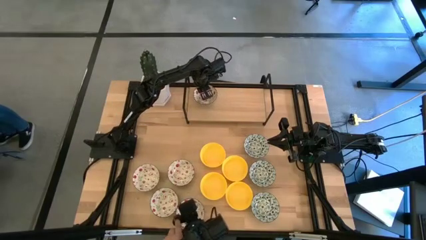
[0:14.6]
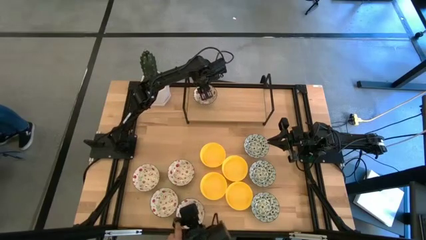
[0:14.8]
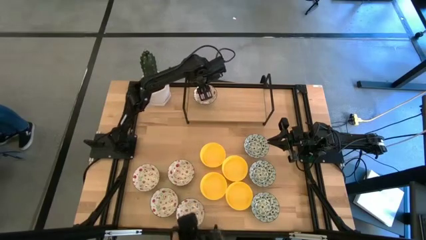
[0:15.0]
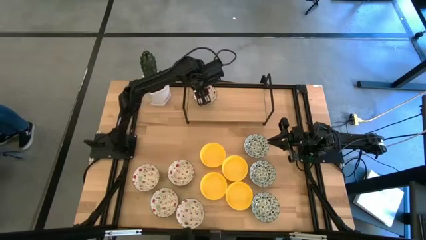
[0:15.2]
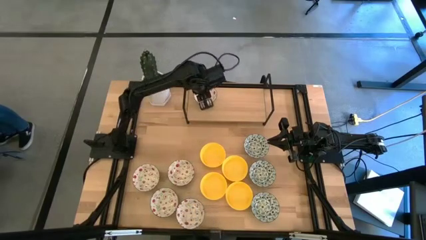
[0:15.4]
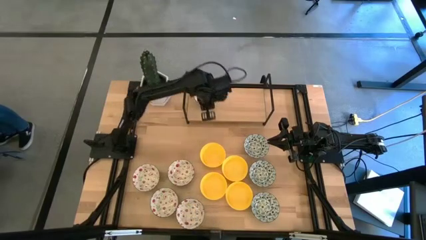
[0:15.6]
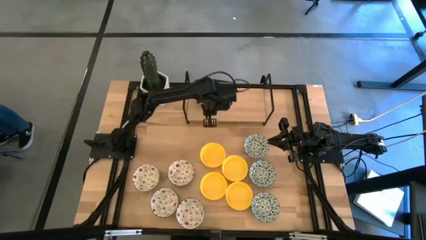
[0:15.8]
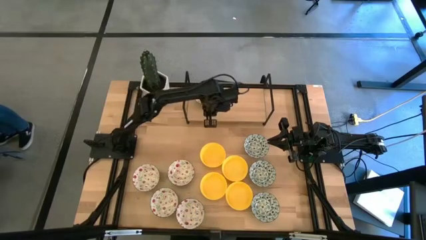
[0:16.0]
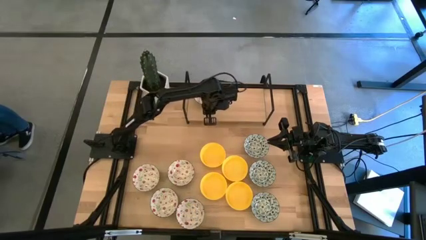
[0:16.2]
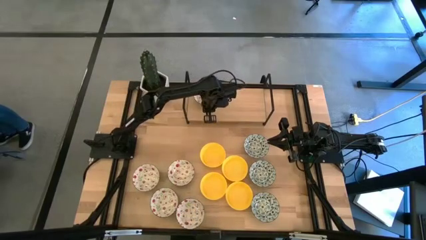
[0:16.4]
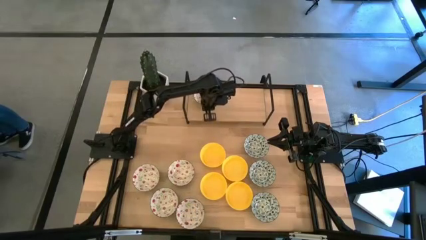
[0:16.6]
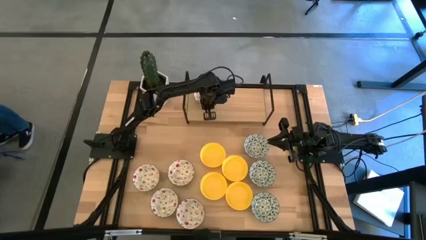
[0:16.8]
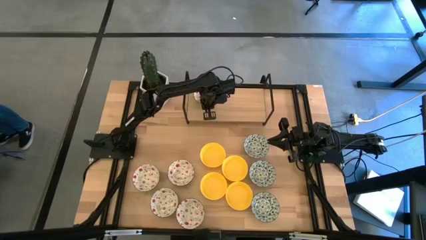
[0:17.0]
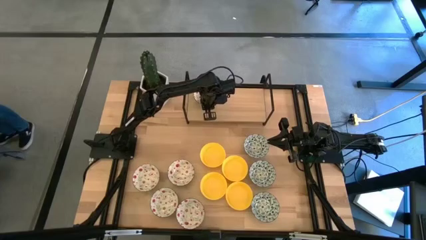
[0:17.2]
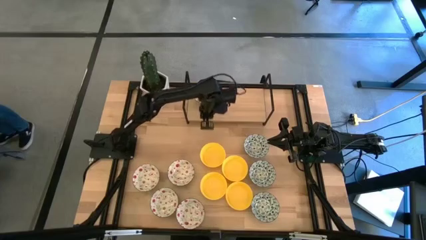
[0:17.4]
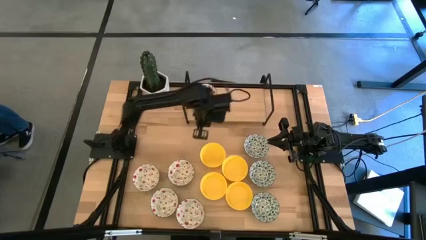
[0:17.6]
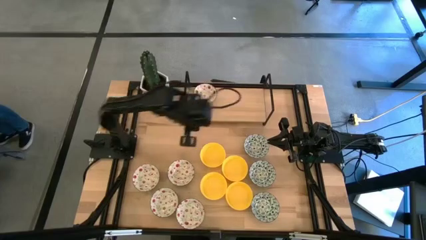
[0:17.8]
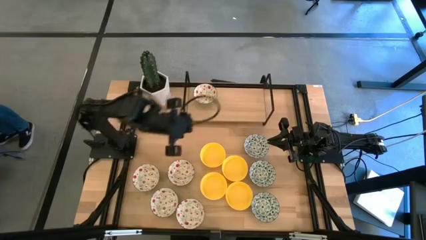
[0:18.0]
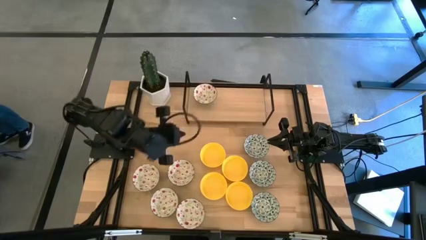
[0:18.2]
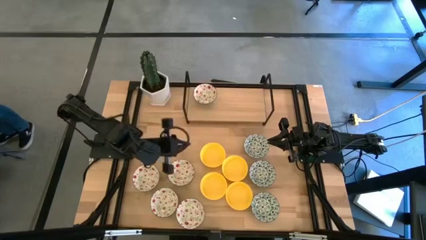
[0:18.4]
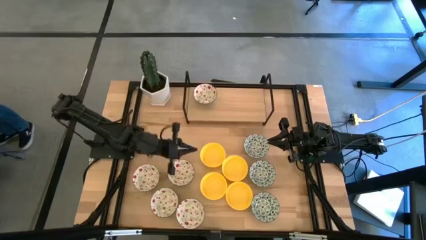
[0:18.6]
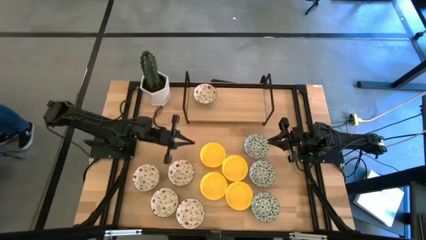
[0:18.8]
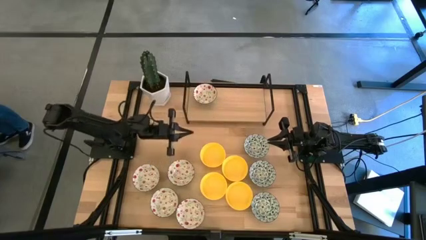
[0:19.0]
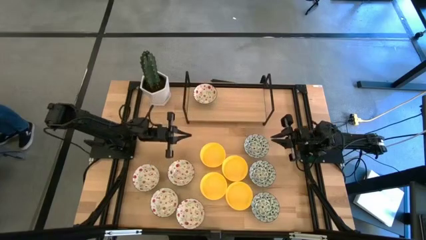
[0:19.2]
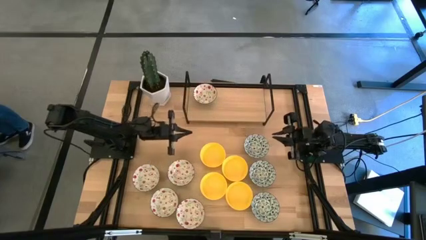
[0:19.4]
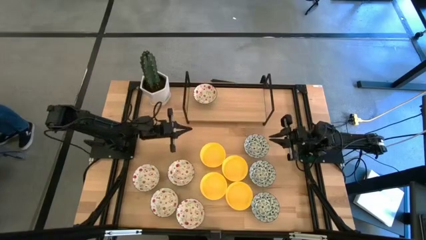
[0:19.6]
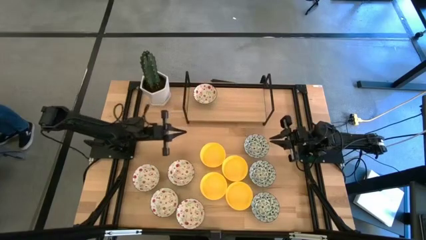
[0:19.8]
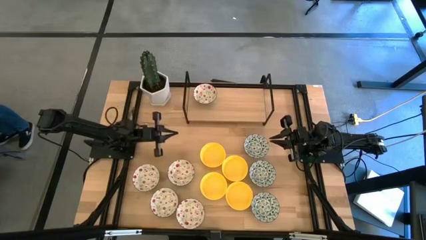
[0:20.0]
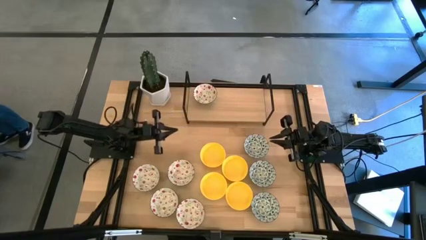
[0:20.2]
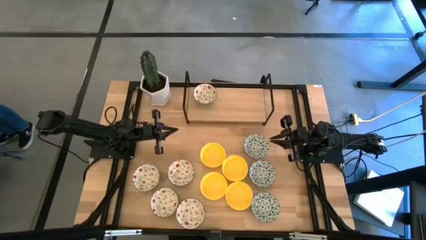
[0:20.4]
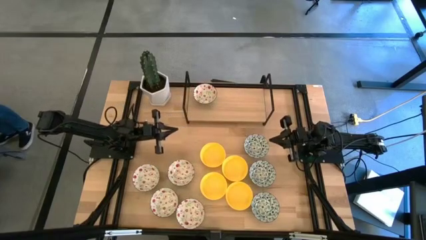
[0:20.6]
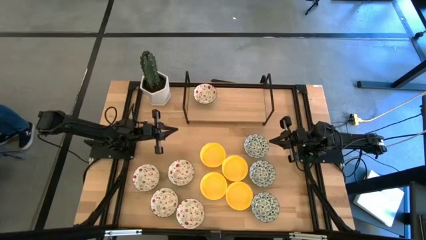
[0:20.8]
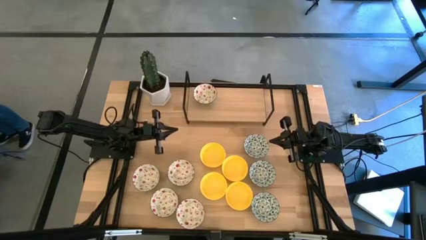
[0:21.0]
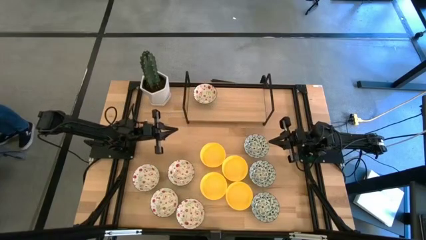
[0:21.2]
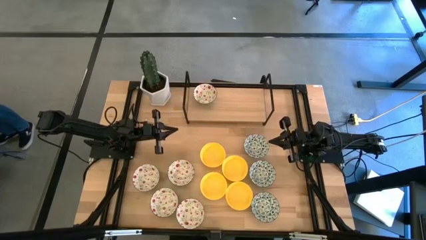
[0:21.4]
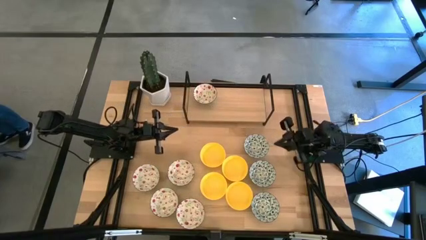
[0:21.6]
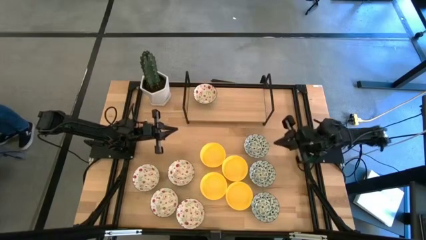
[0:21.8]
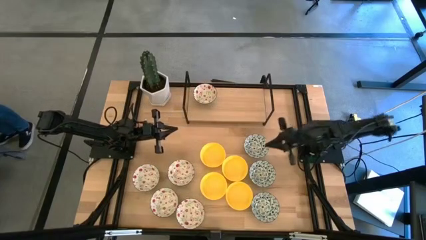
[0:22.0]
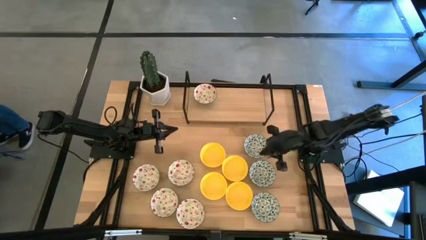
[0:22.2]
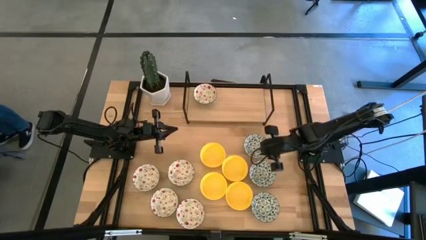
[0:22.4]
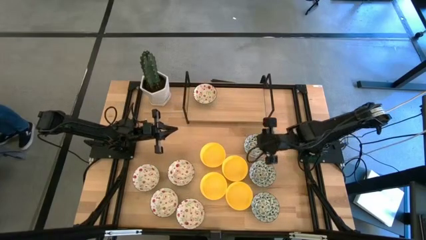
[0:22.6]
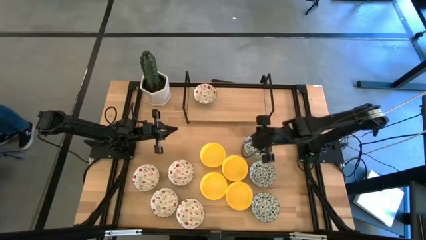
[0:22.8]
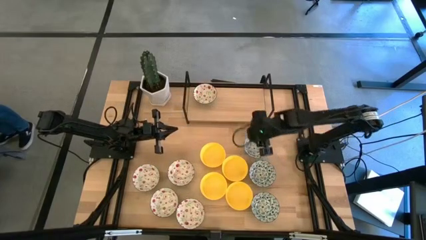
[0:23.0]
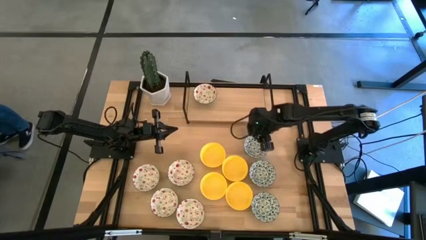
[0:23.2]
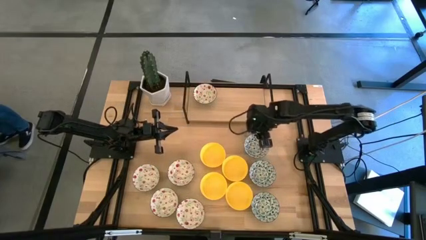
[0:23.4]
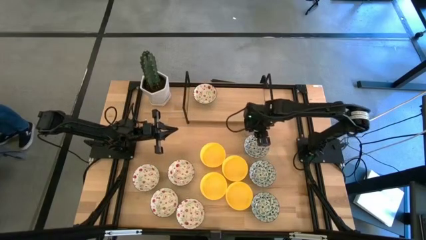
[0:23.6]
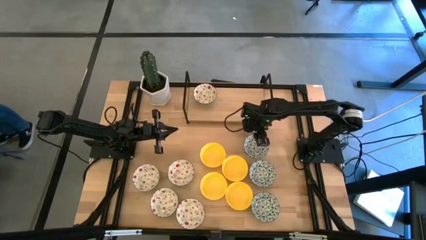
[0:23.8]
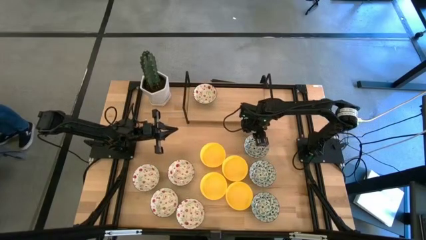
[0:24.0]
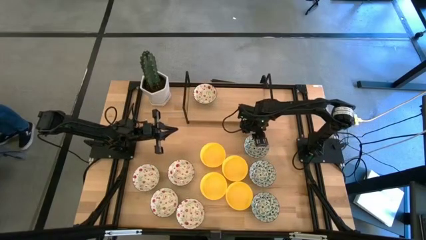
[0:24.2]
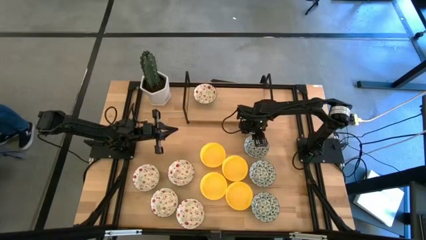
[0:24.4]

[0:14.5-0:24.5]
Task: Pick & Place Mini bowls
Put the top blue bowl on the shelf

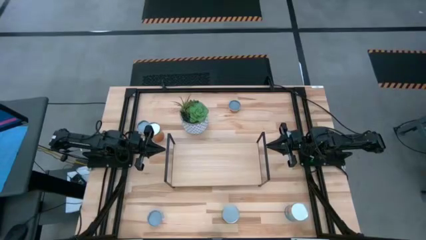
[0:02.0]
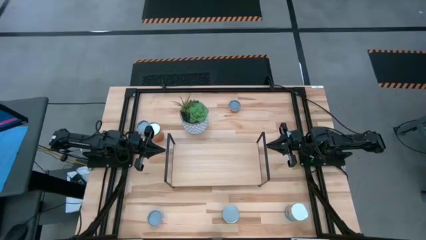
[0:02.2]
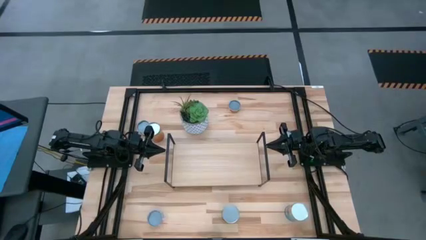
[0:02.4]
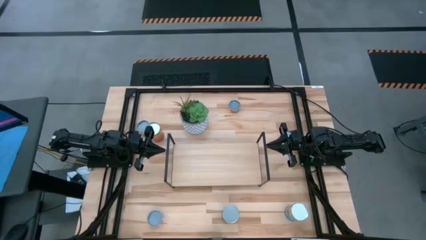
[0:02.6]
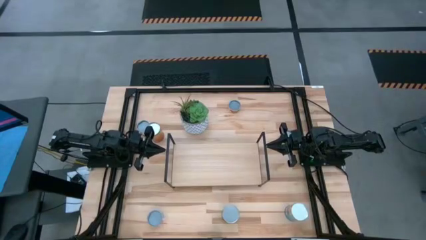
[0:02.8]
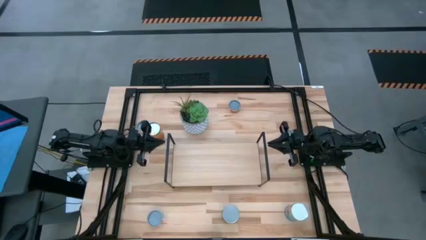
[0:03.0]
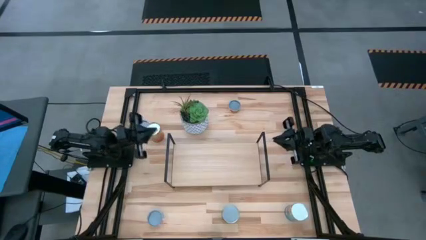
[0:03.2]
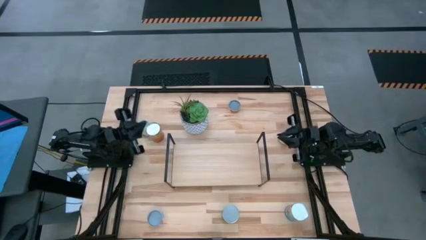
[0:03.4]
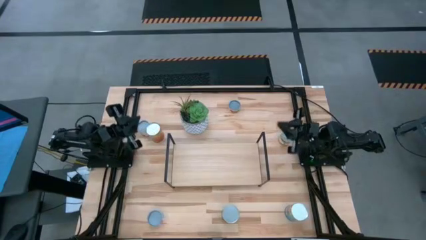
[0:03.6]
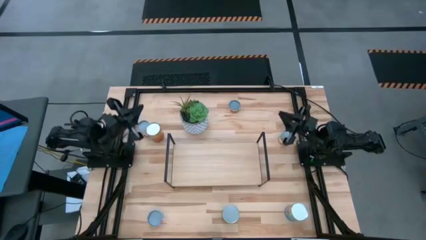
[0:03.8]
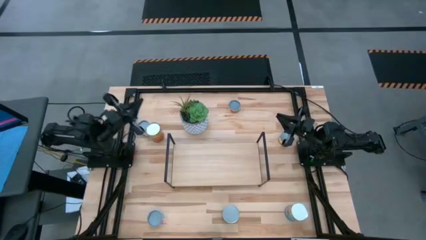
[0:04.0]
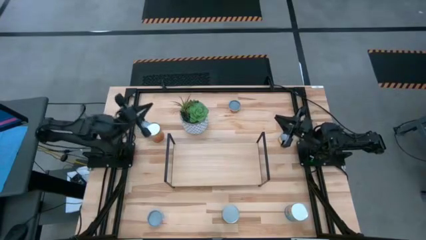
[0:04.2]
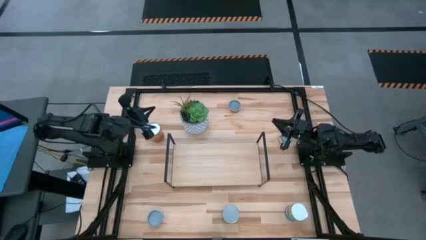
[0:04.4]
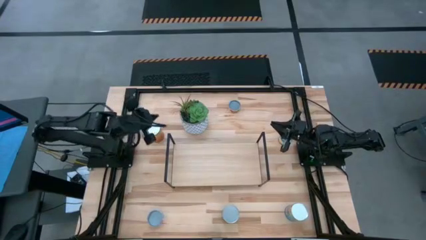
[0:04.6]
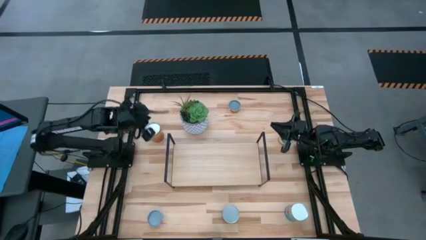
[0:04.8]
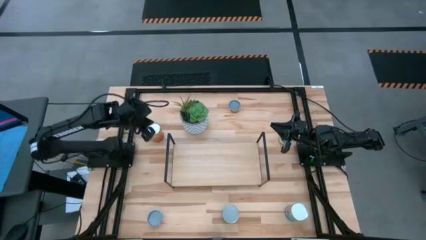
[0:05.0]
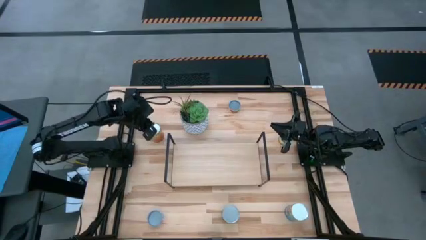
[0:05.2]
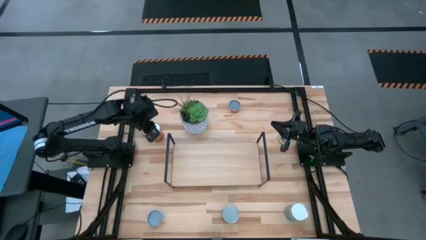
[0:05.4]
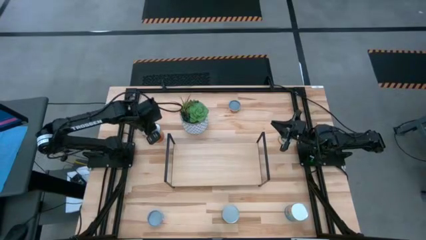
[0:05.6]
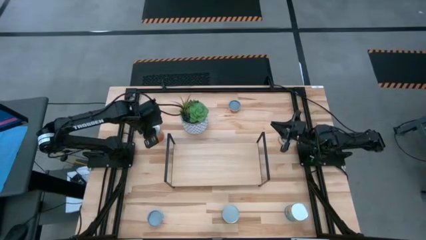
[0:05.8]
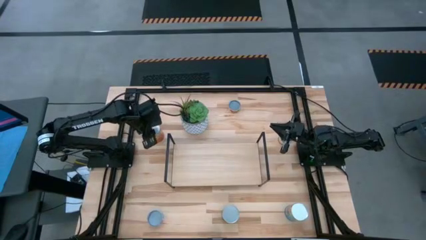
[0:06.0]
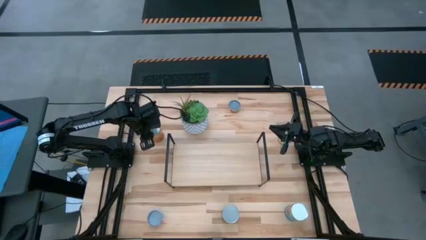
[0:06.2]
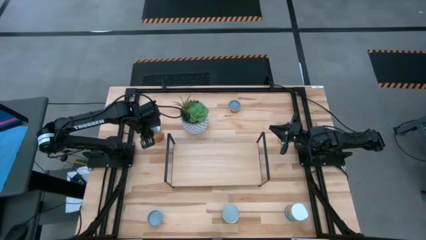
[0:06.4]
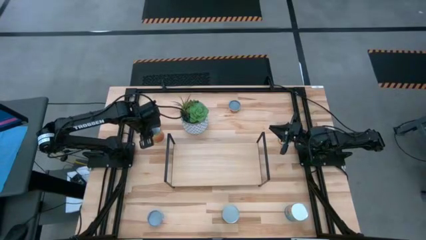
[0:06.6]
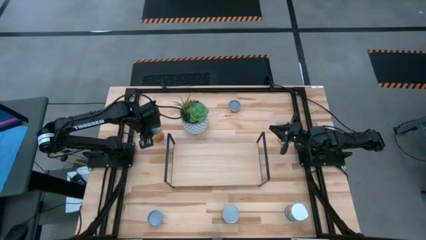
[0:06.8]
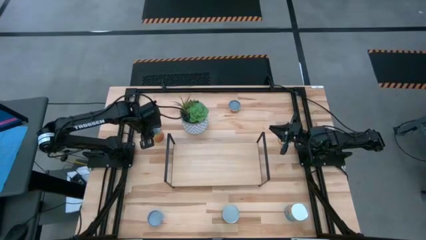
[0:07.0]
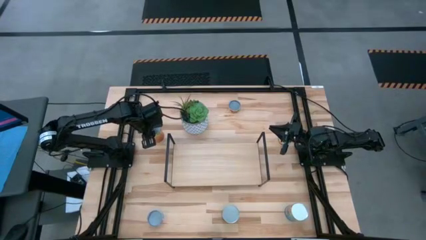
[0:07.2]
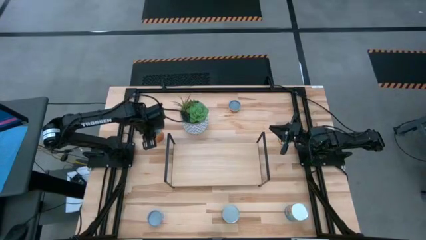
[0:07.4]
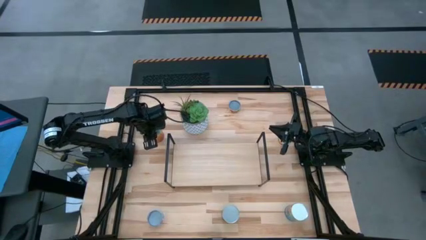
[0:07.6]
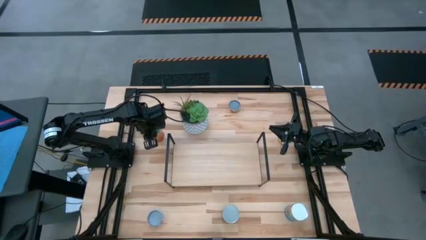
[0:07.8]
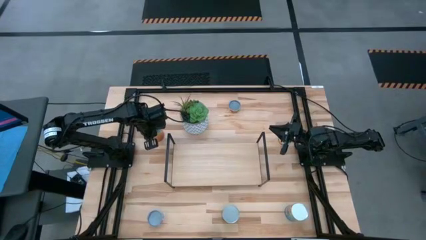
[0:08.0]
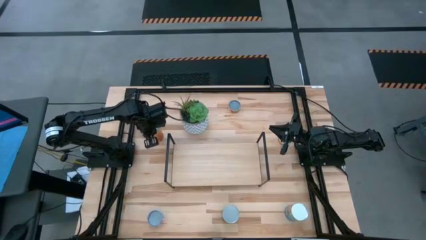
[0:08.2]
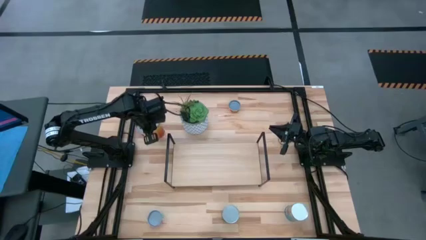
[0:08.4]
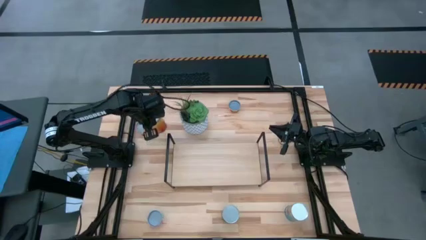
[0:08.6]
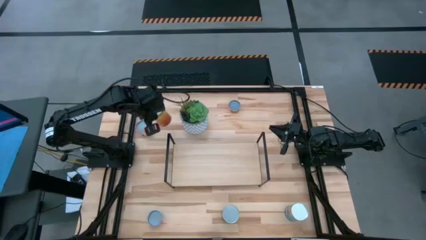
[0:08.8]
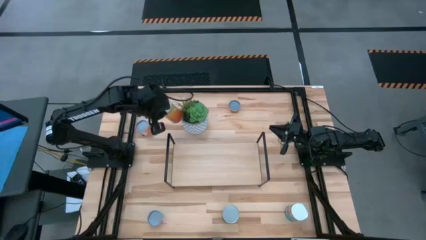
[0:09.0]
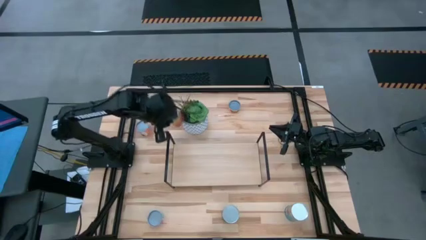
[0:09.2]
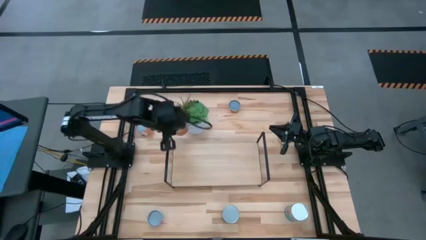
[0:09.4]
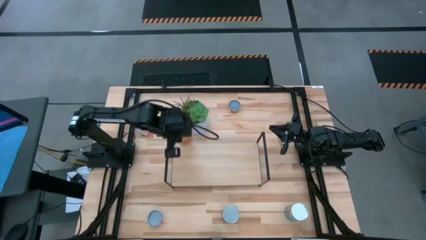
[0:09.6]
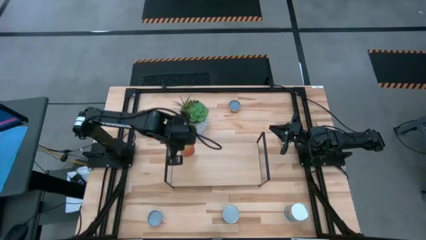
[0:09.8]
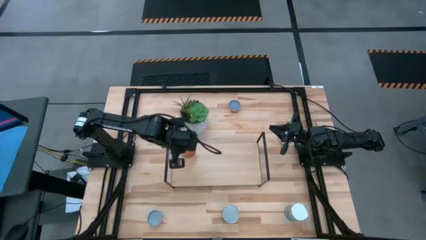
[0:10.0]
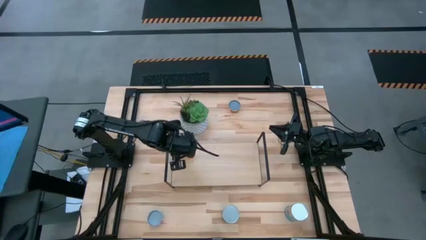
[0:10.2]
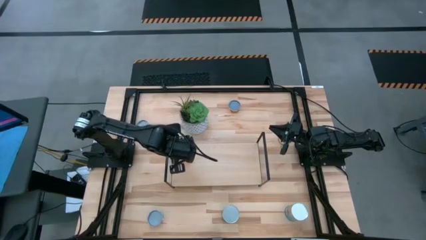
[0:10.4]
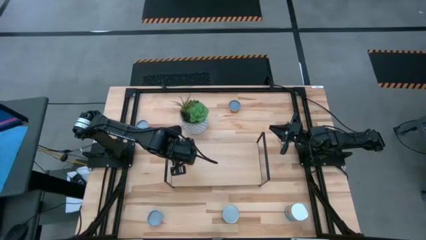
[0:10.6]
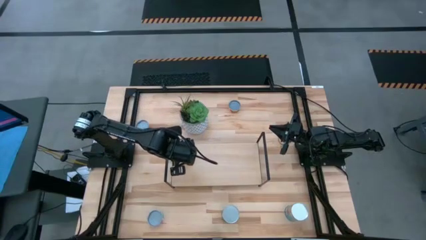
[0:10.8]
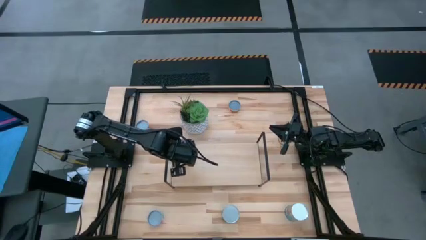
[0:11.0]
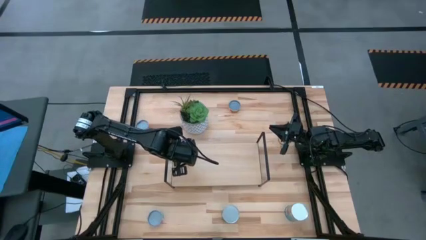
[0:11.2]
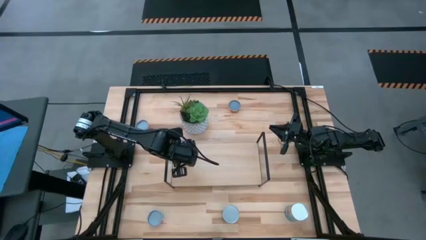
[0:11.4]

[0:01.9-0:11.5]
Task: Pick and place cans onto a shelf
Put the canned green beans on the shelf
